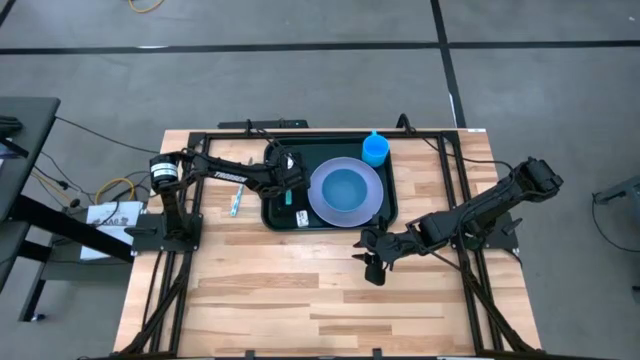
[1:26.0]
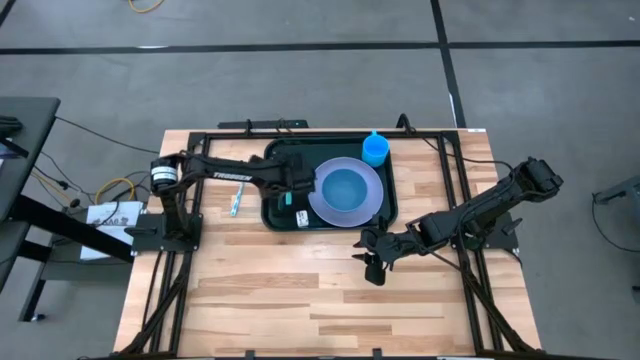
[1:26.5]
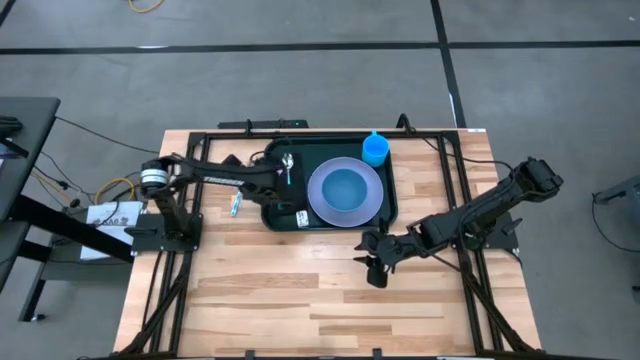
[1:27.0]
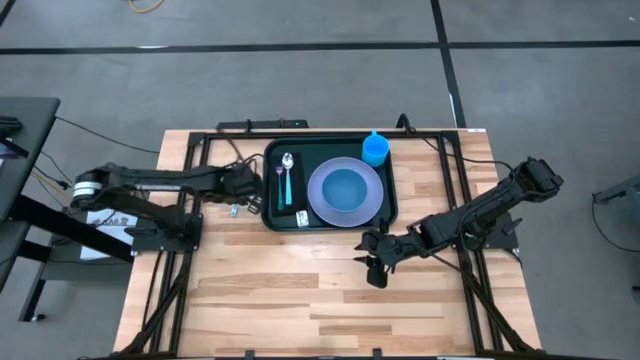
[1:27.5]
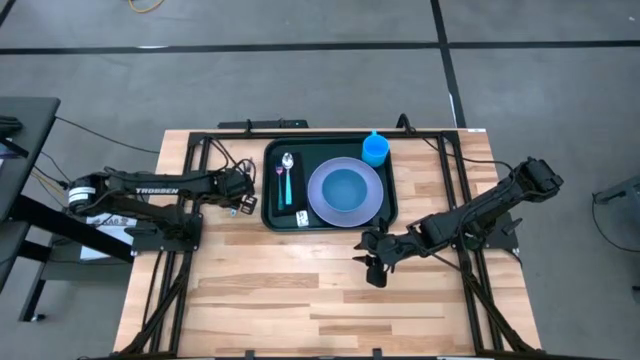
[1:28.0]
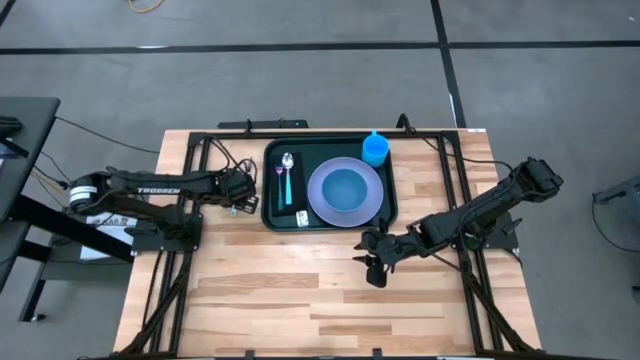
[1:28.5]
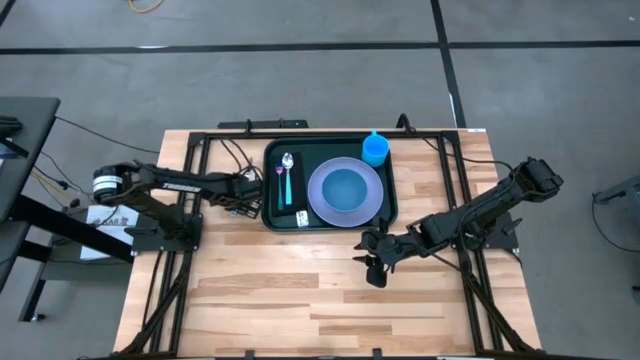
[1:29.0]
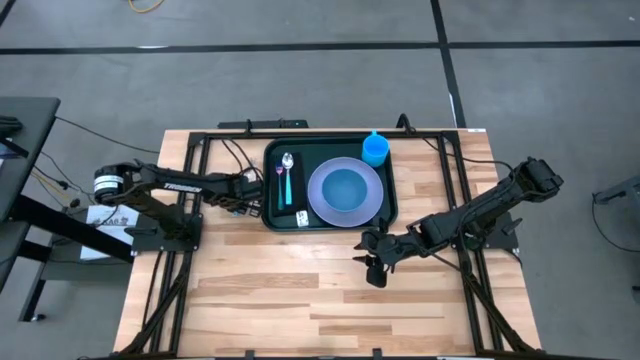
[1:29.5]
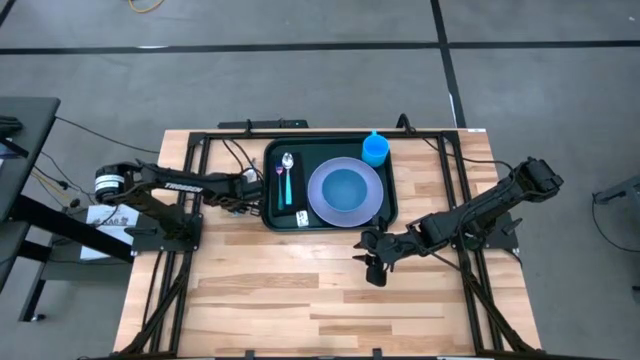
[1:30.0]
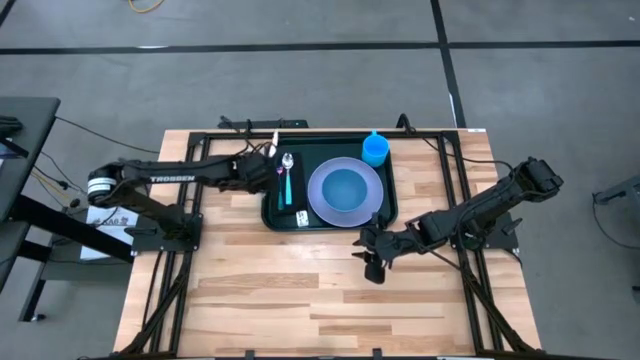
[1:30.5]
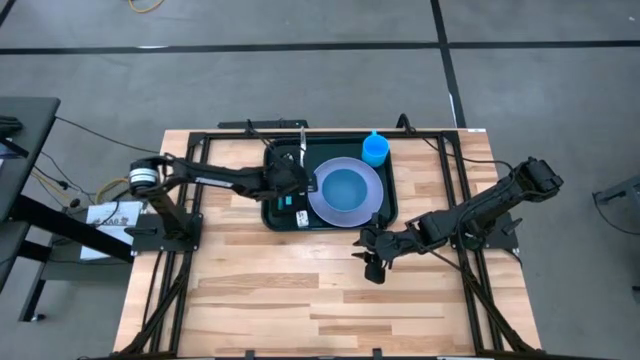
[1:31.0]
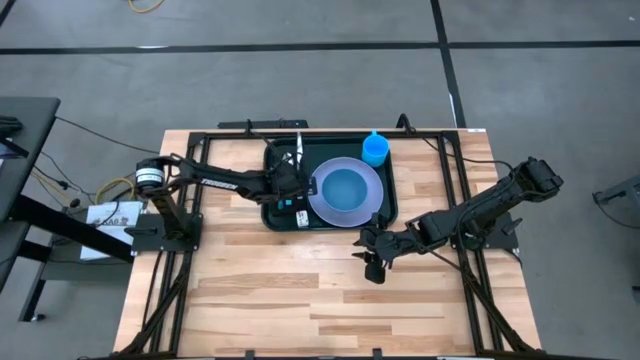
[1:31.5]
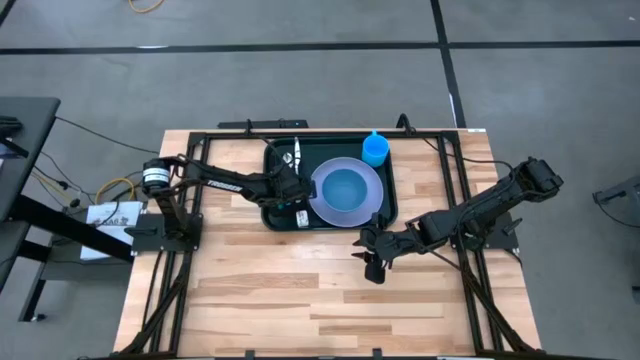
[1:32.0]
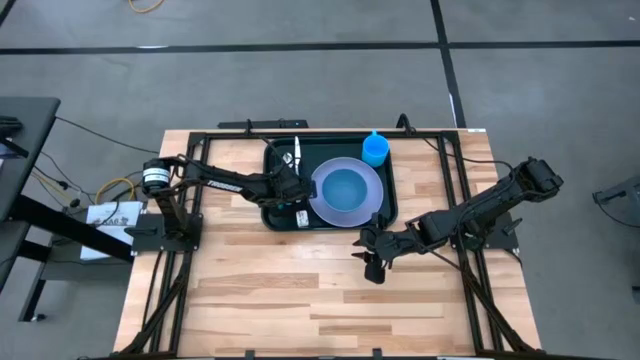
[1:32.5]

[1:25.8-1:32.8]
Task: Set up tray
Put the light blue patterned knife on the black napkin to the right of the light blue spoon

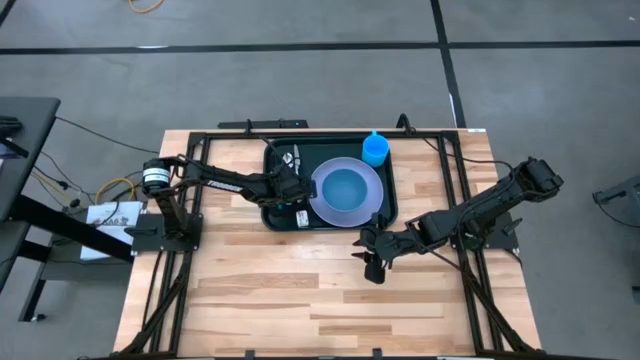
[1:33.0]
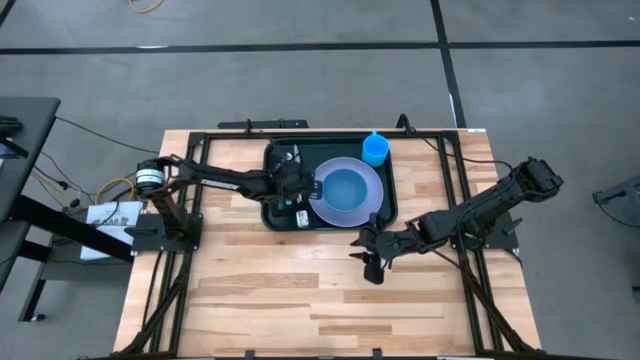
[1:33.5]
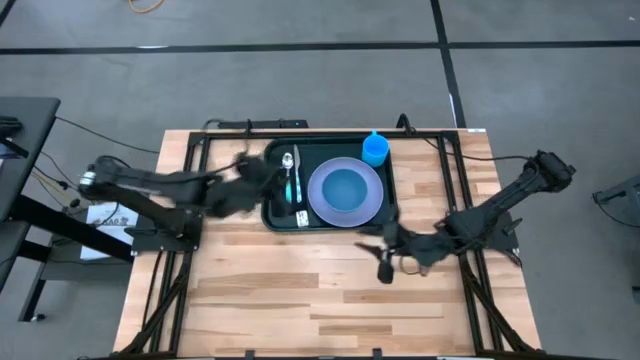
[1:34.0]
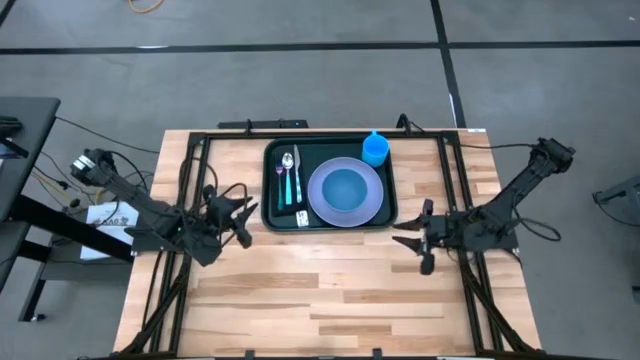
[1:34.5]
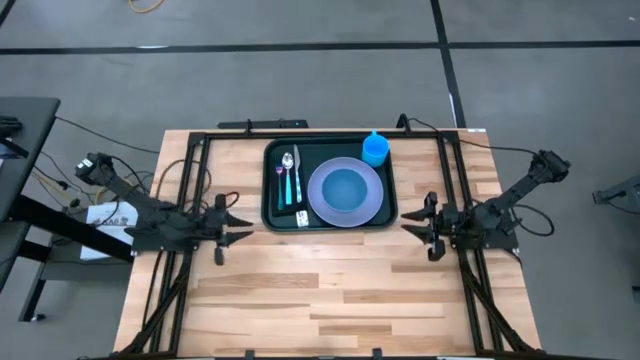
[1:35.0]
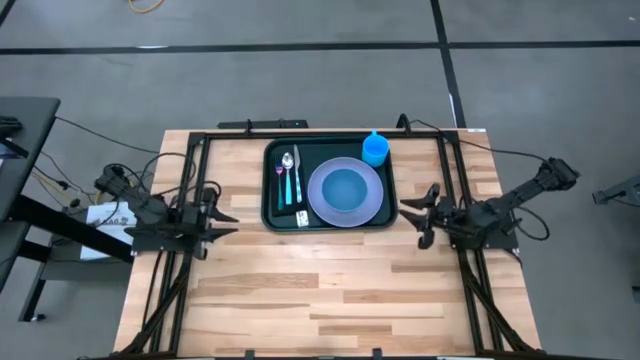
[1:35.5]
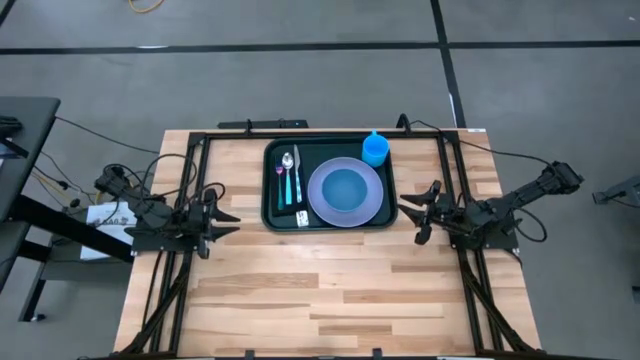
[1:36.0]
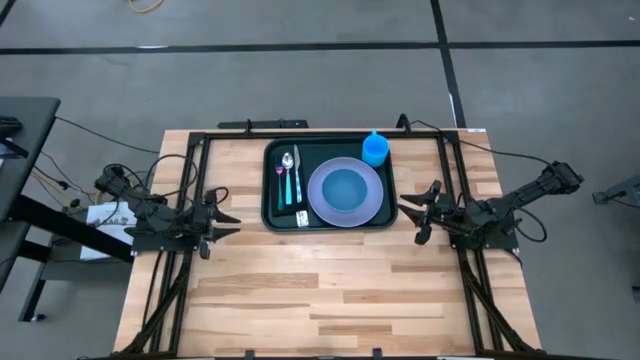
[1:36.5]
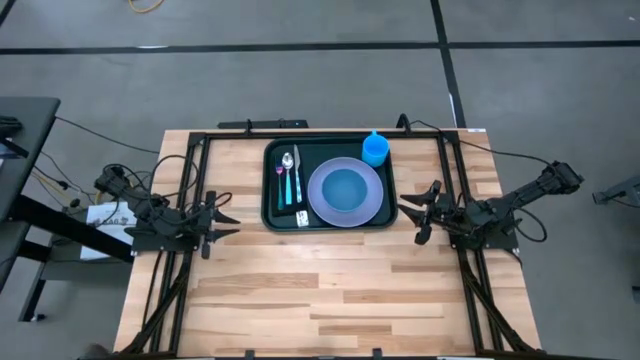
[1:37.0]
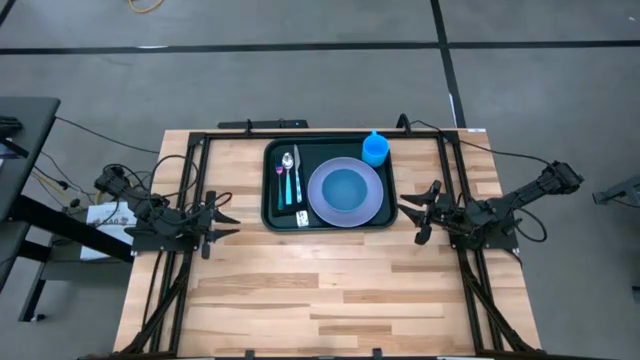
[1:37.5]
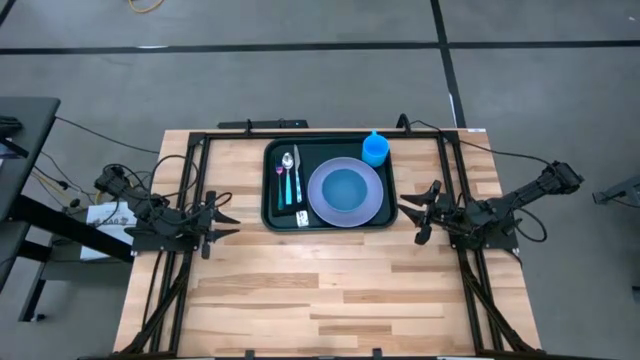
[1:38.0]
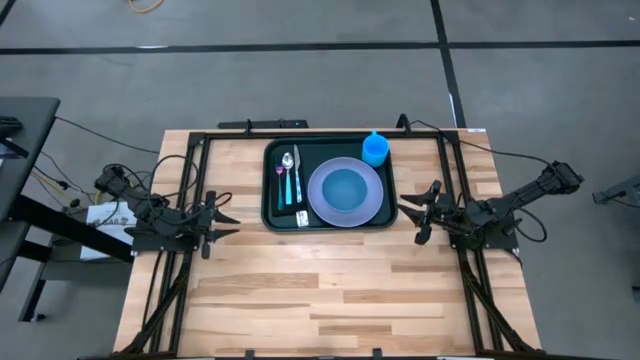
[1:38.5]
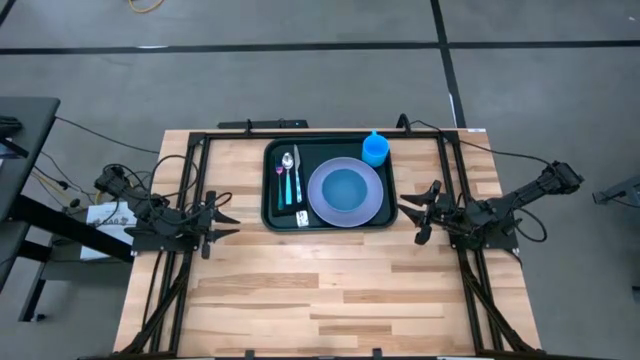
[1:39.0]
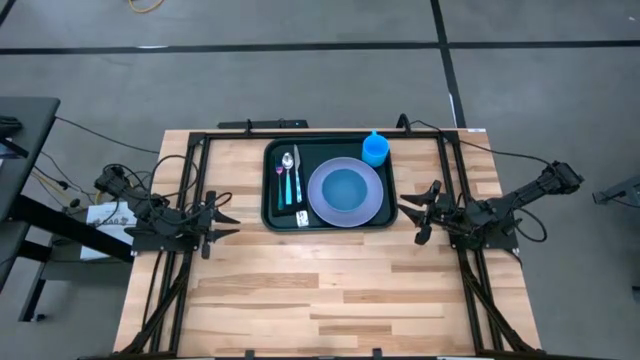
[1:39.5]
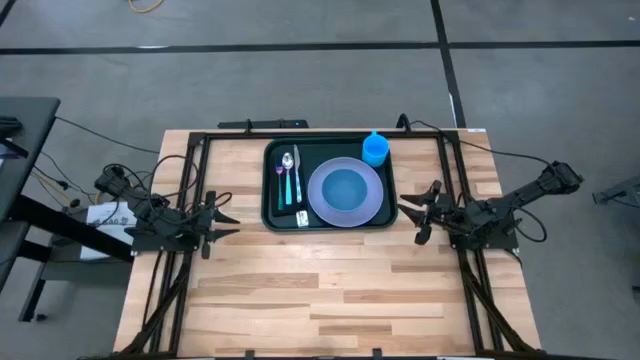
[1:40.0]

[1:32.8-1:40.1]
Return to Home Position

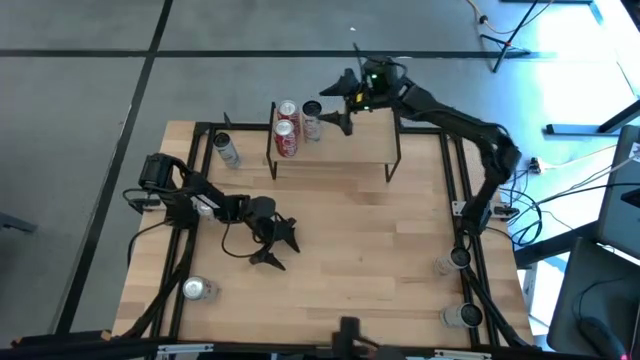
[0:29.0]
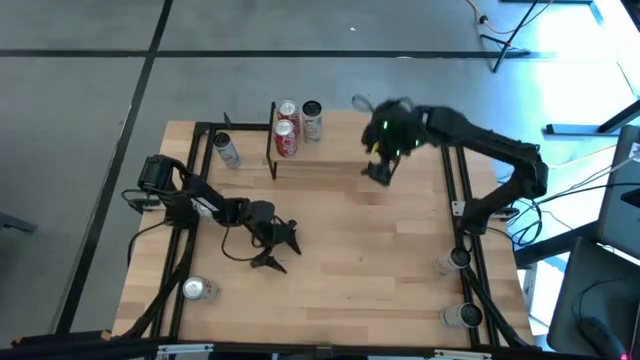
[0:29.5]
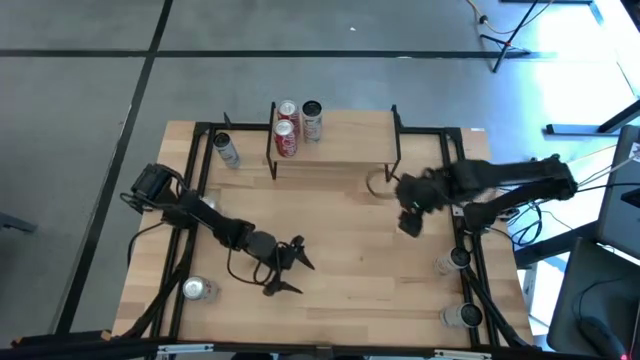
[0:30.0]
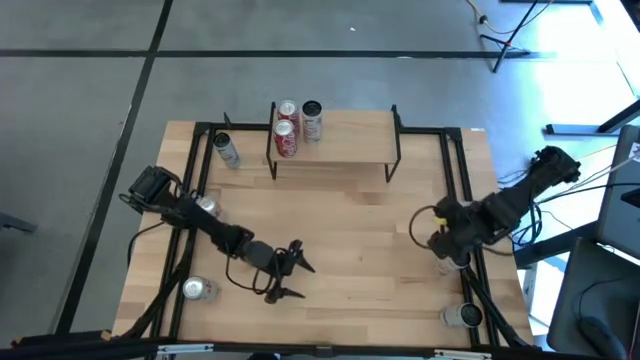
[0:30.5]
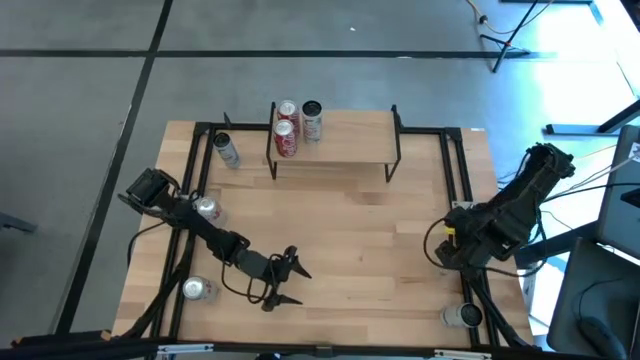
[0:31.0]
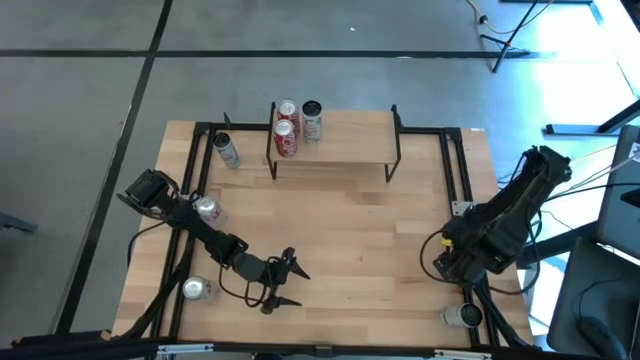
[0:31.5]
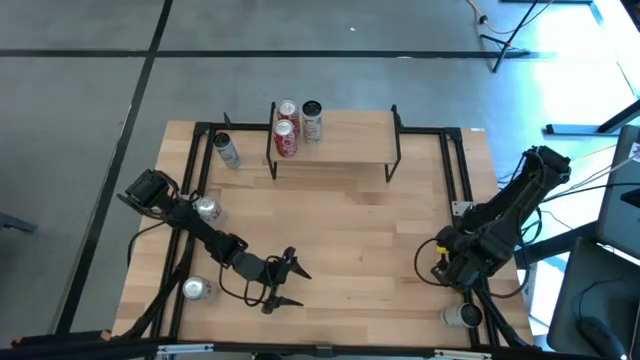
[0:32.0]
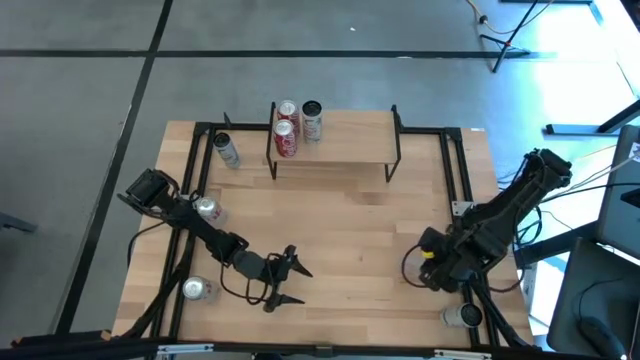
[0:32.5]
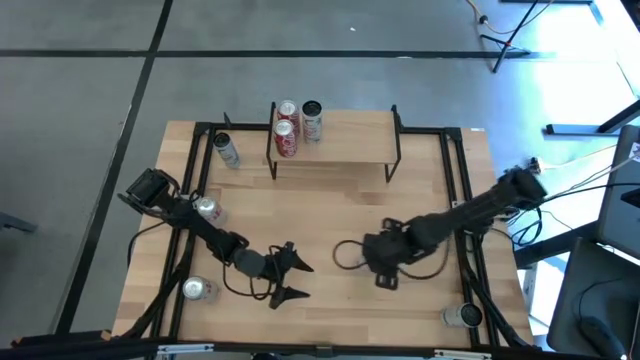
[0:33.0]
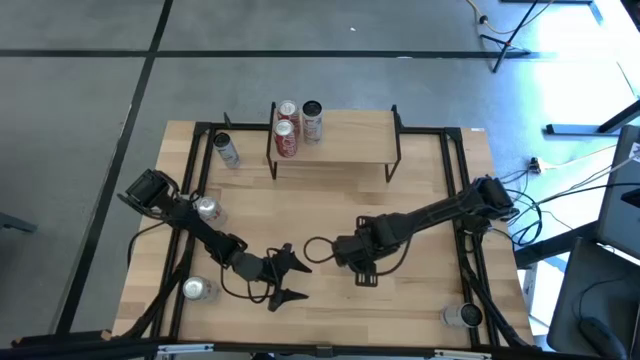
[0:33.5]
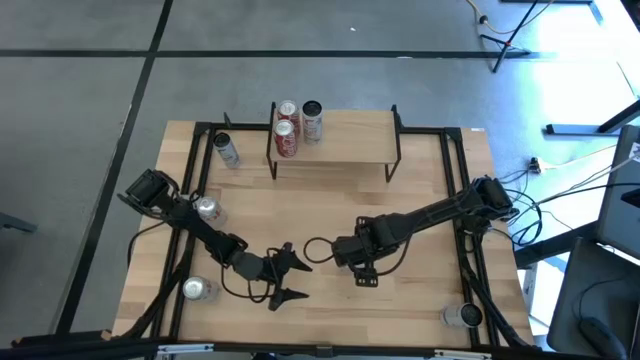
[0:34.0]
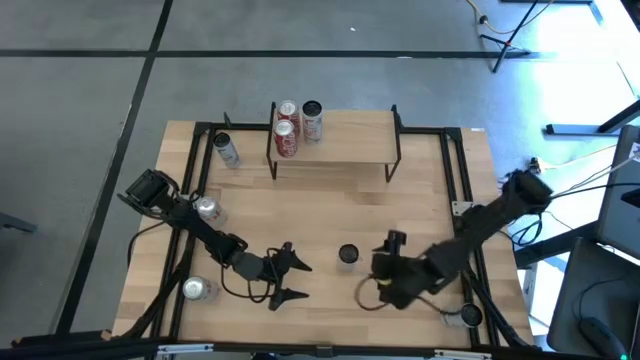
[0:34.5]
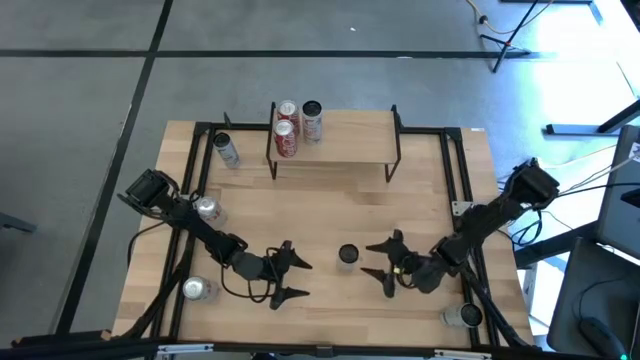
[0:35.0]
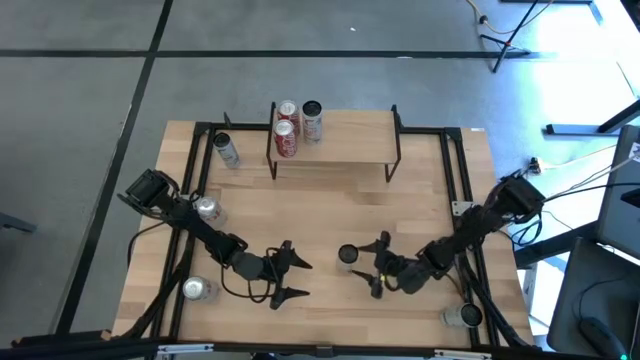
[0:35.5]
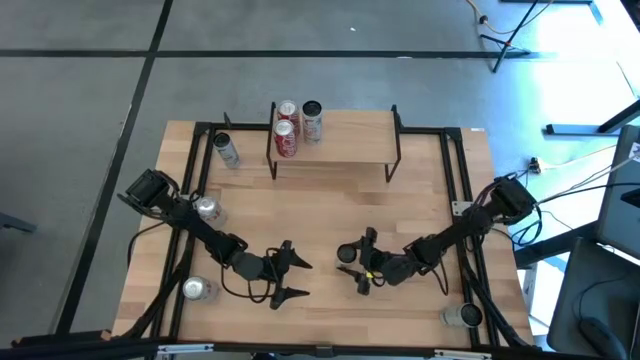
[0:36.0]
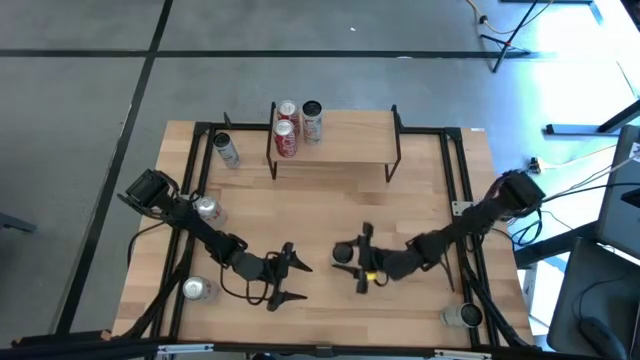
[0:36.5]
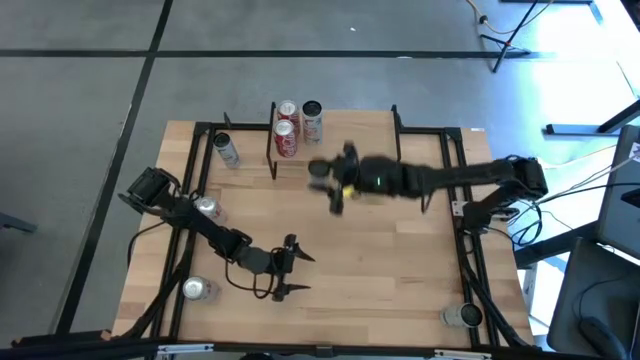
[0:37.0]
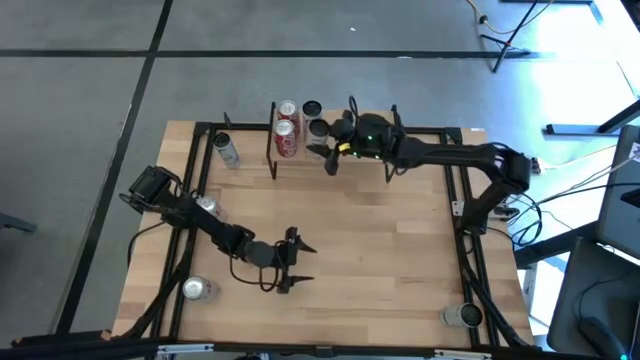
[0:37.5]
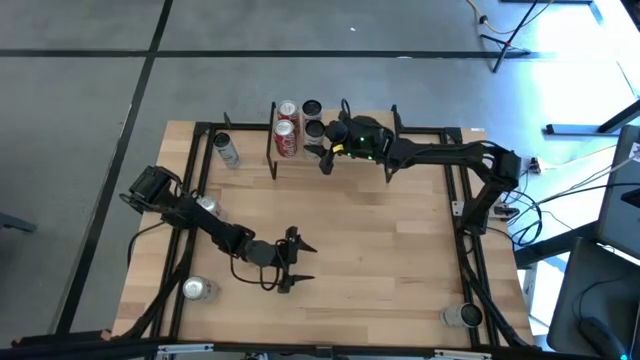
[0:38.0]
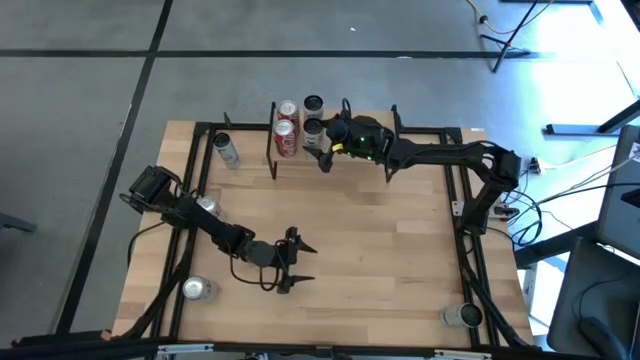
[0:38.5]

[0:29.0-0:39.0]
Task: Place canned beverage on shelf
Put the white-pink soda can aligned with the other white-pink soda can on the shelf
